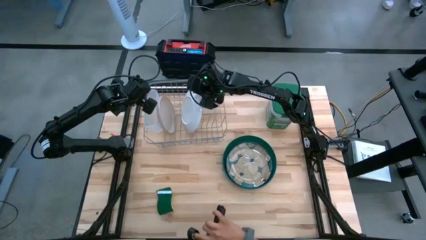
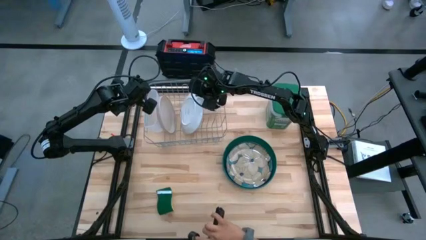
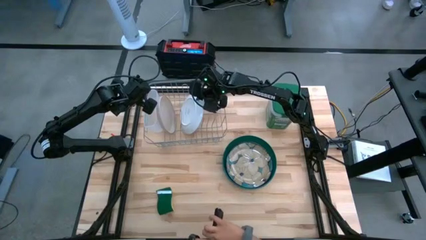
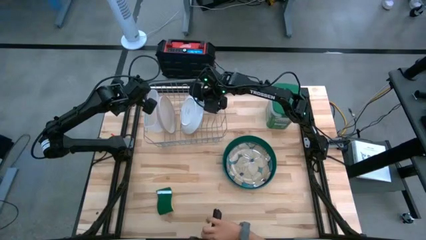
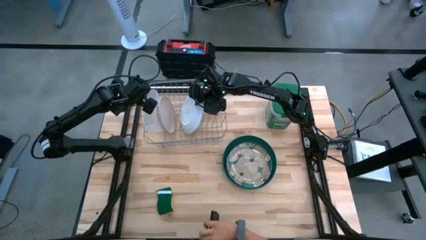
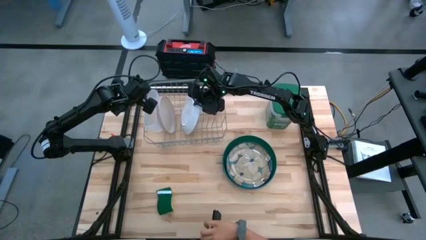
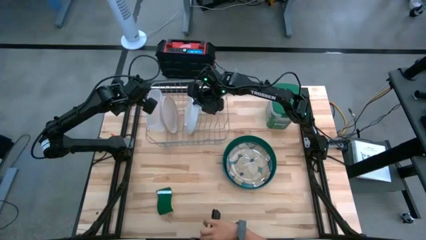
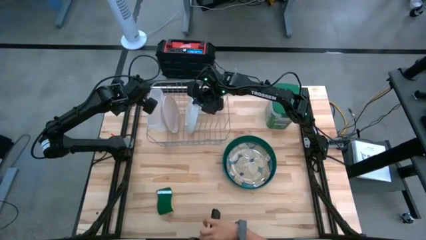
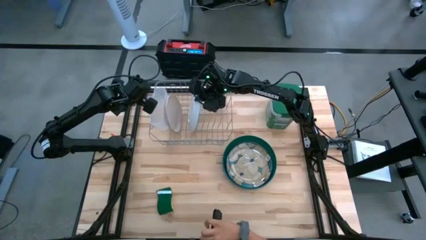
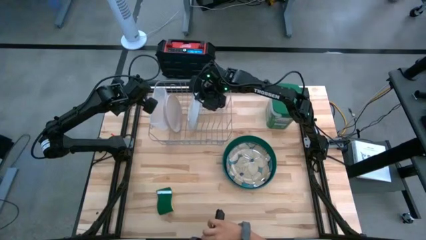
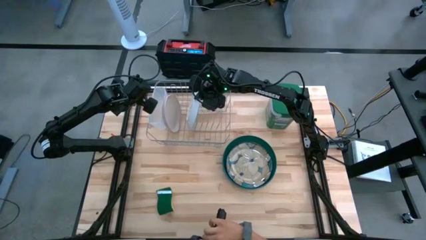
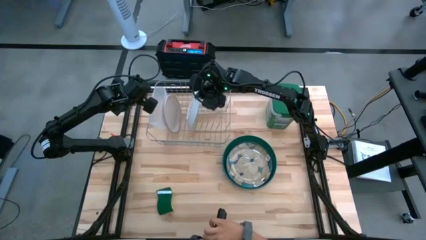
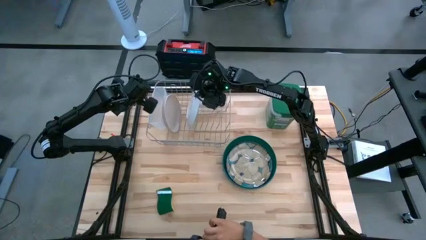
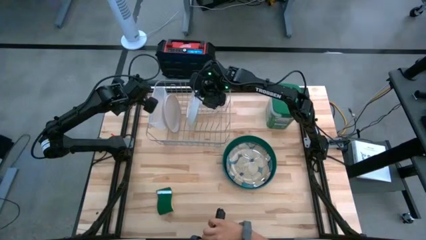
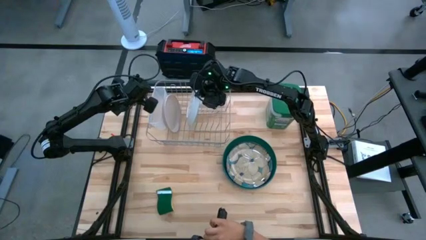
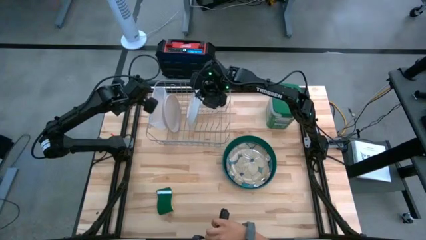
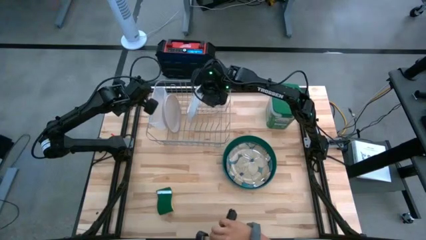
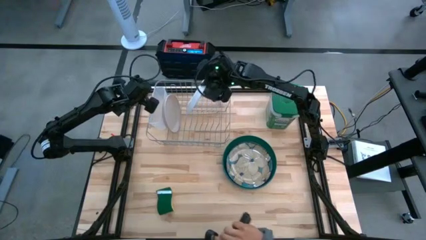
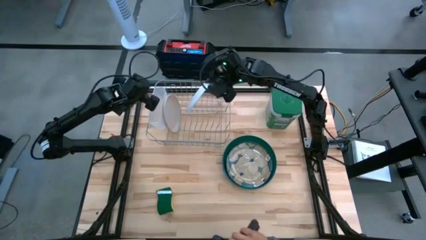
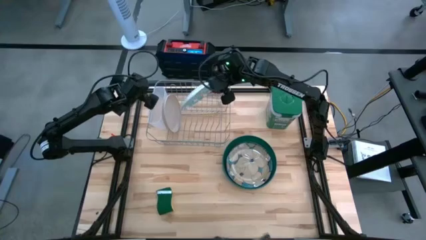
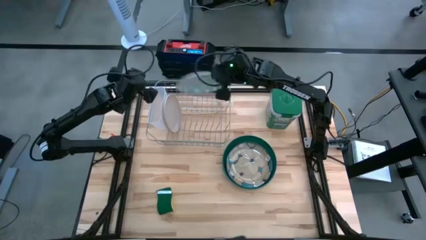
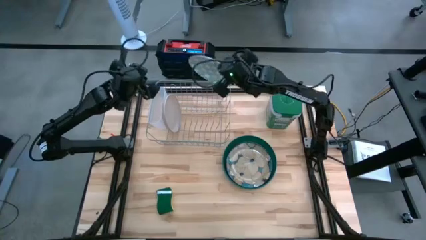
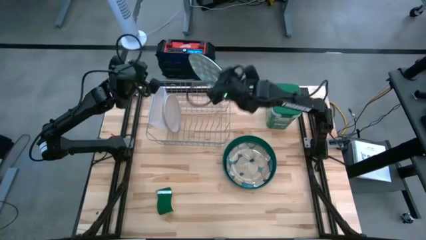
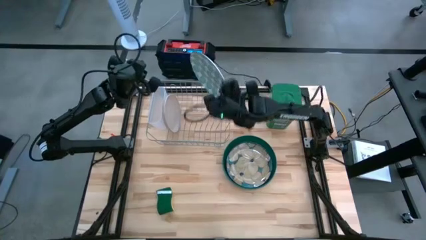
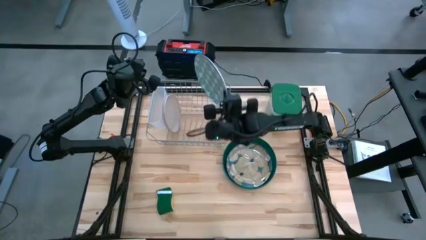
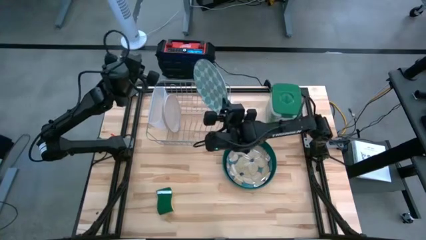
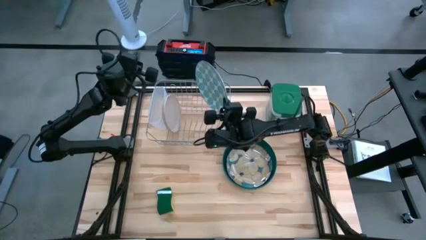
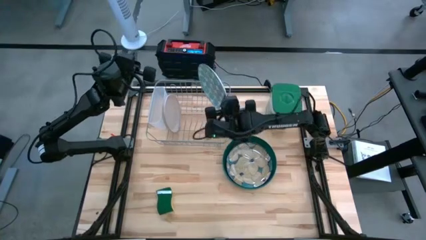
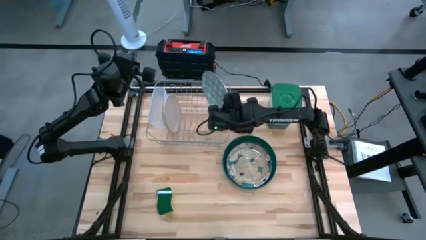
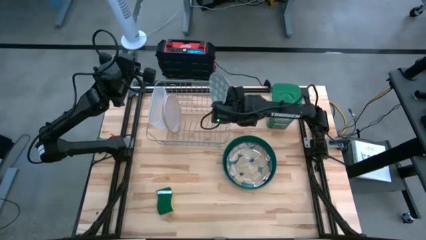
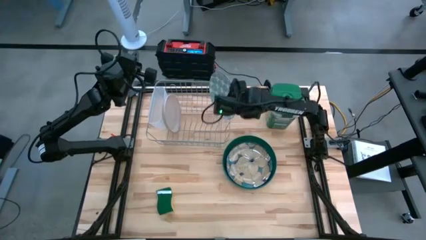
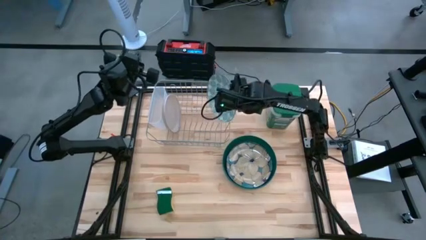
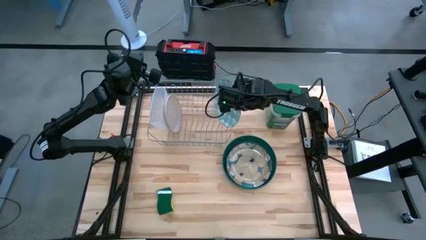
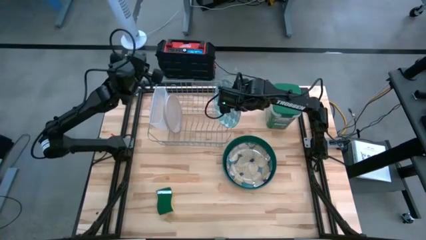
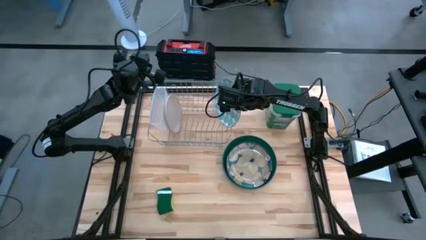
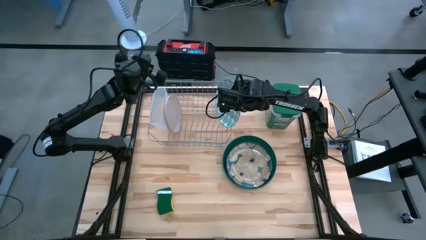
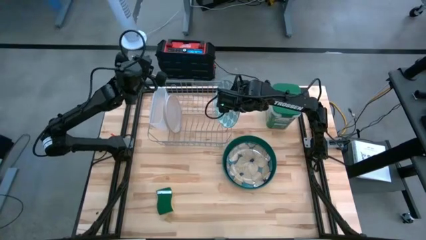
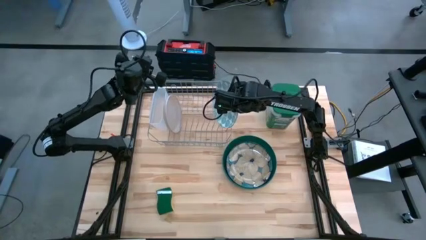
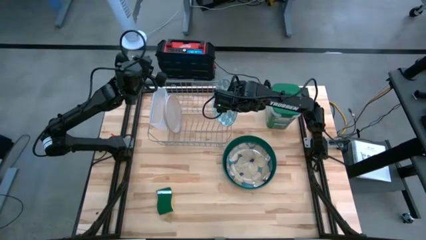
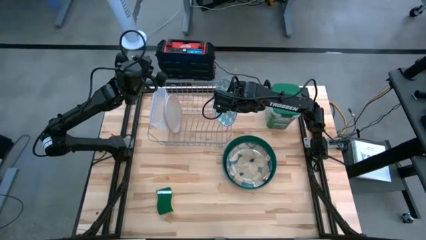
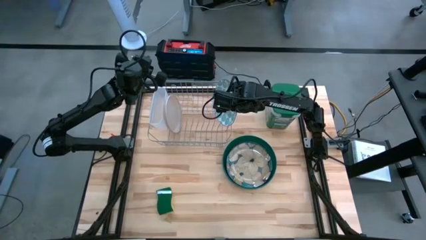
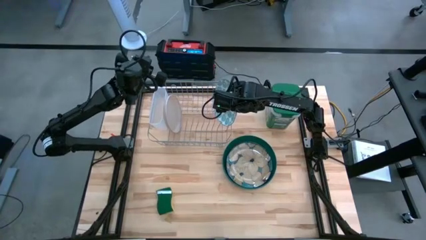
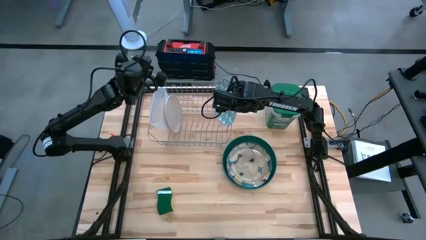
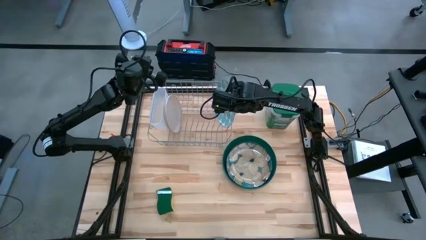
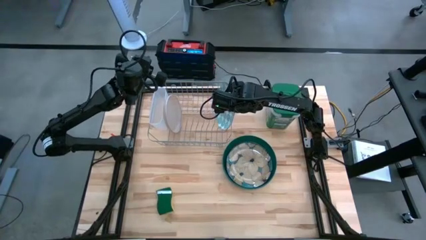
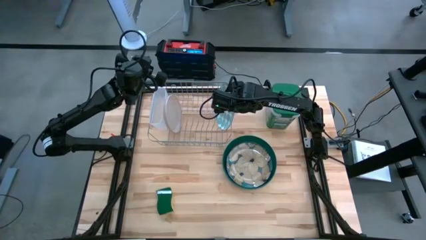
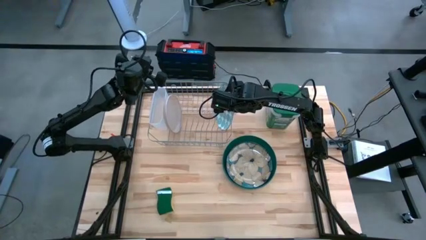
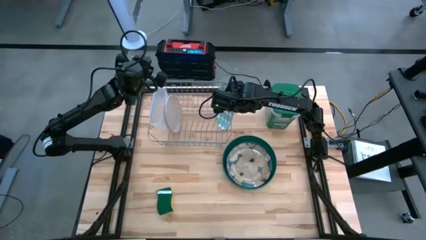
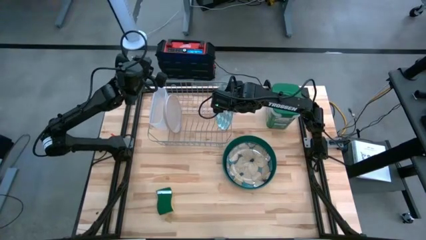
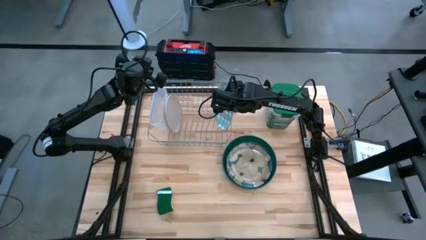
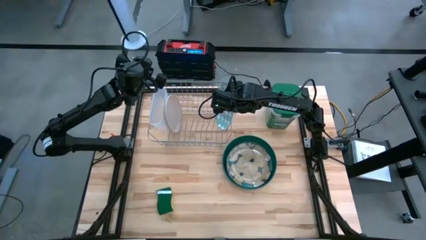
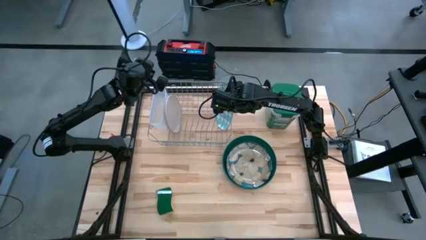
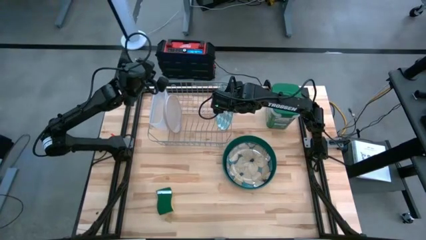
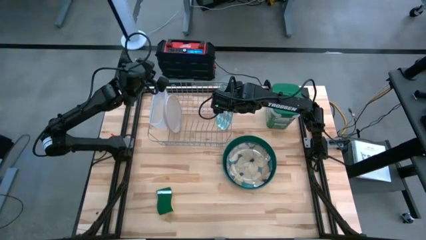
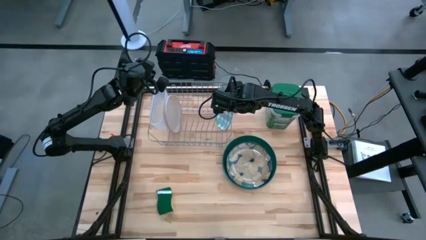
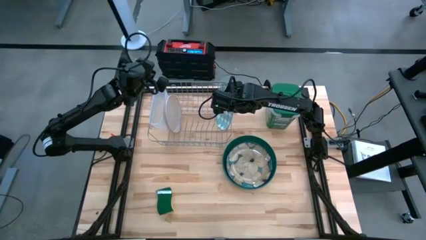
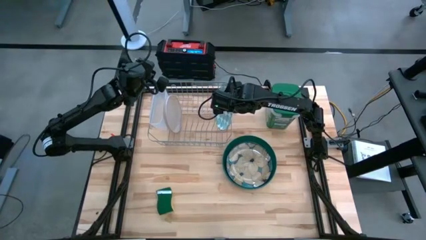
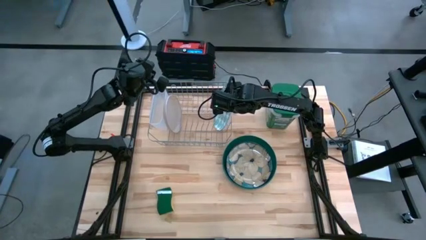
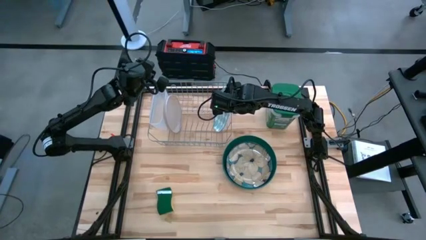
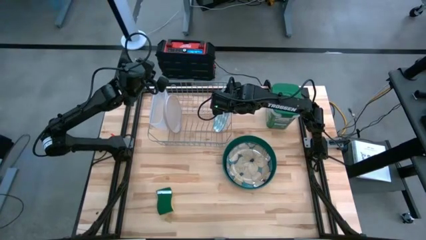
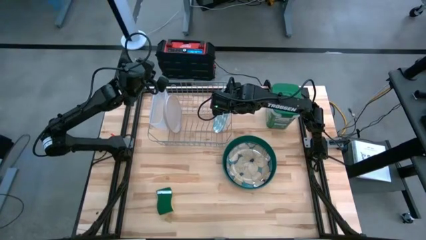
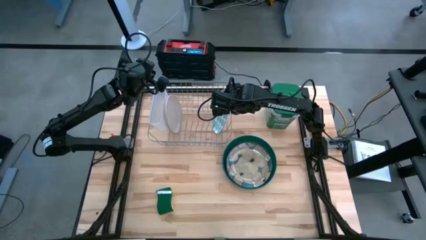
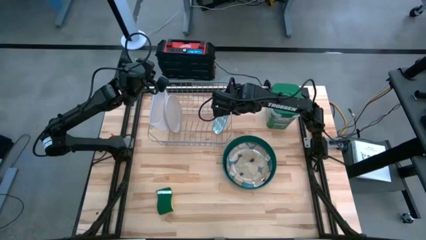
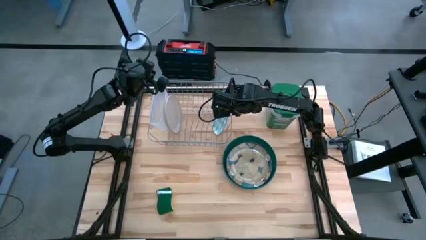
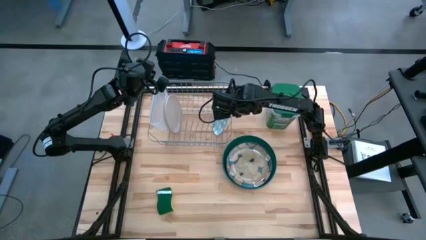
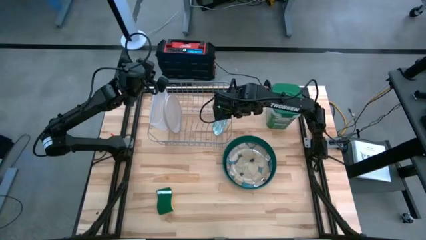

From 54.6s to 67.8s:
Task: Sort dishes
Put the blue patterned plate on the dish rack

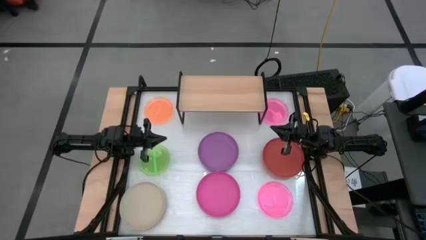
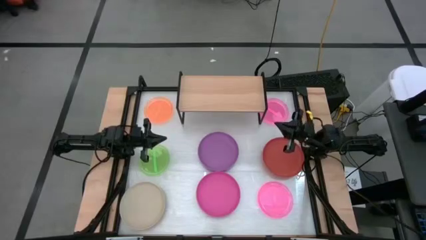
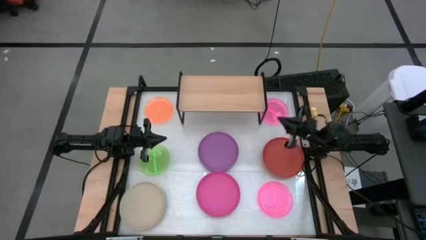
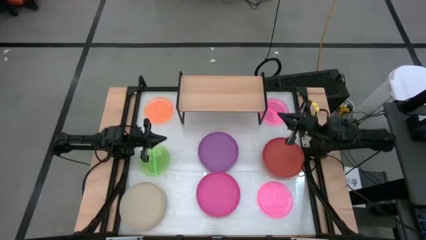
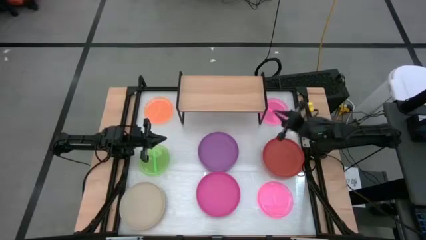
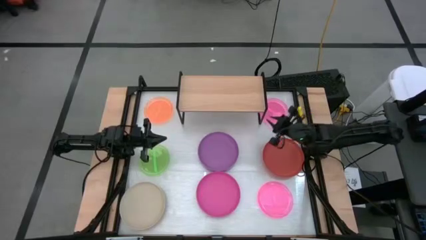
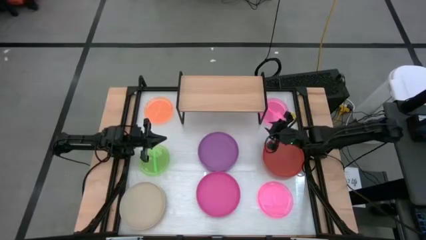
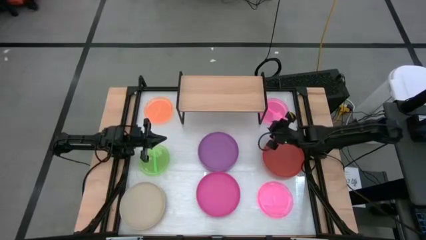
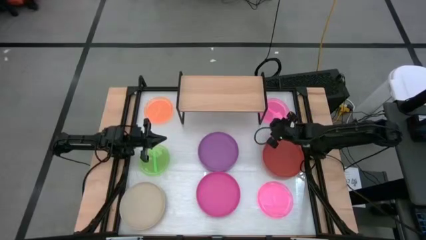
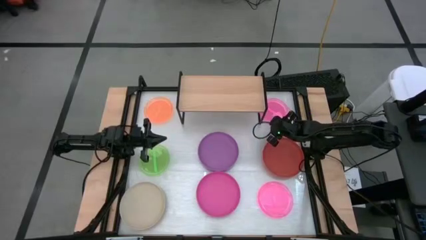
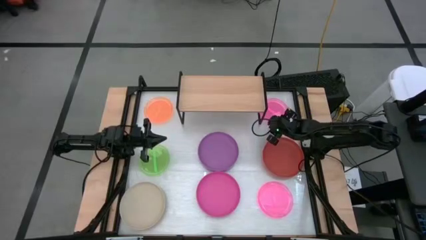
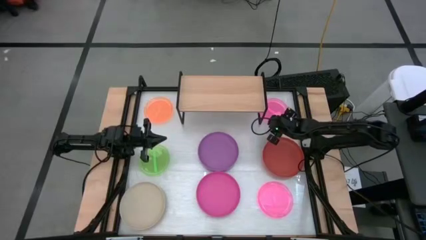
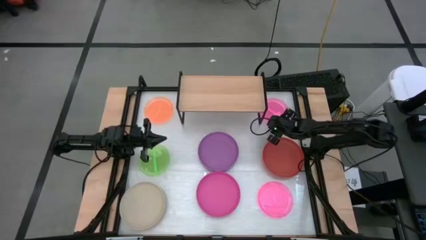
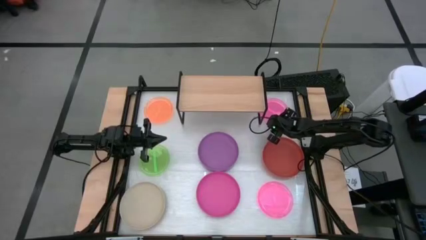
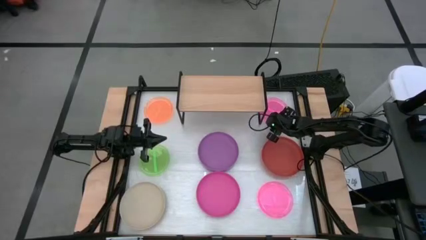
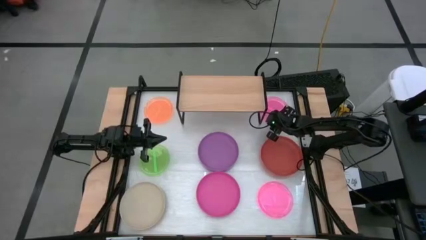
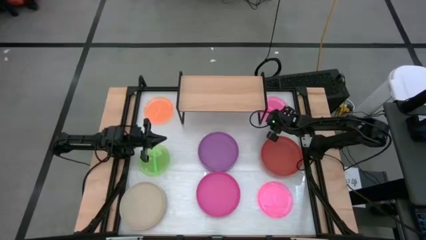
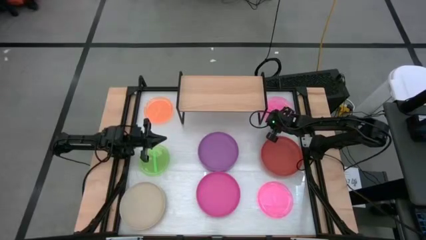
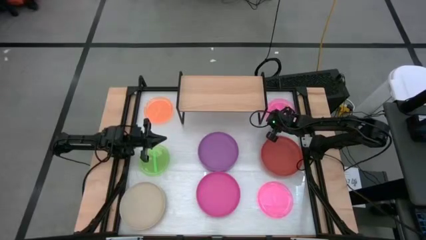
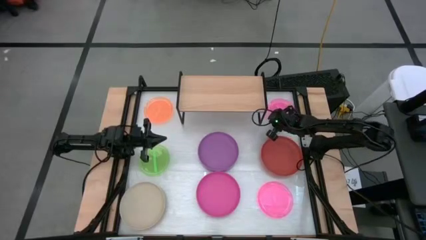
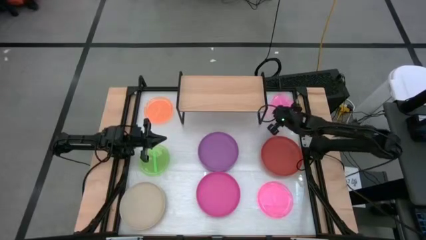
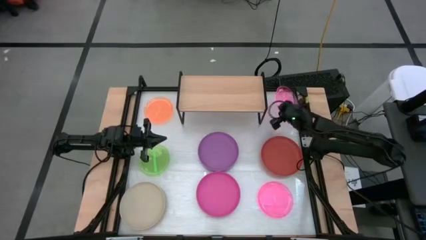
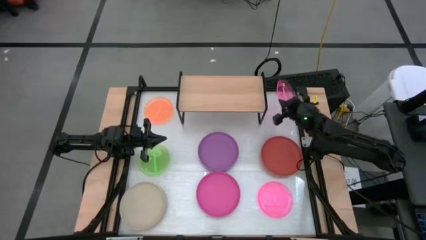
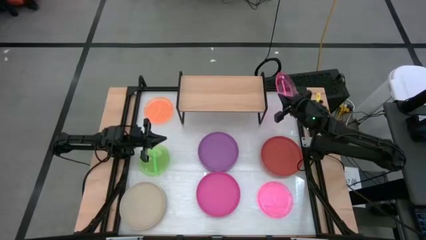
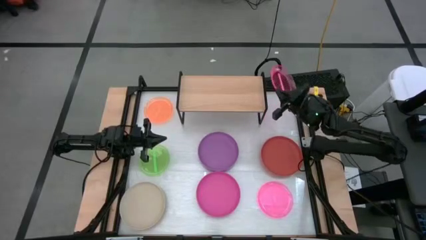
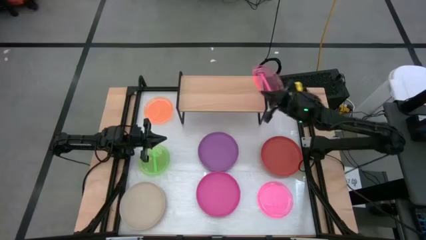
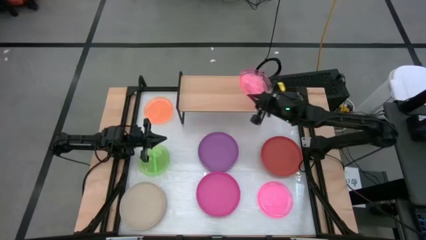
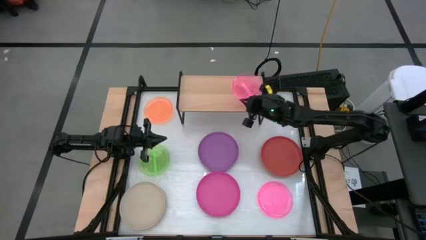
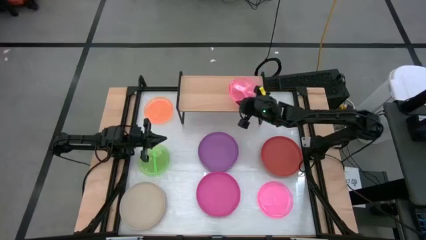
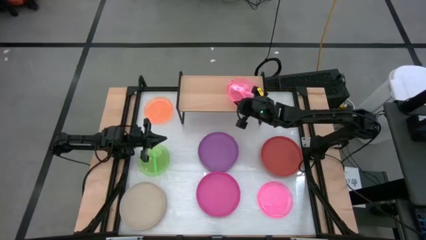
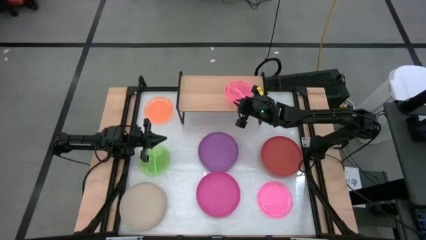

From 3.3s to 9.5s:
Task: Place and stack plates onto a shelf
Put the top light pink plate on the shelf
